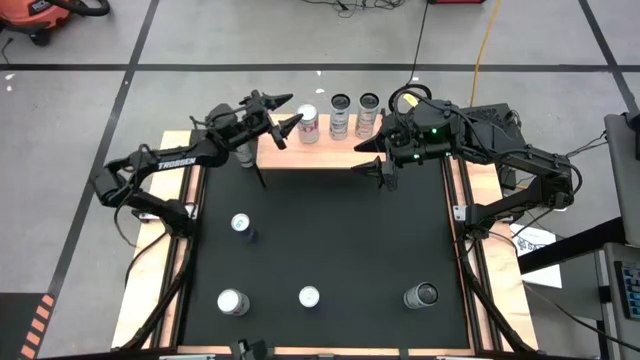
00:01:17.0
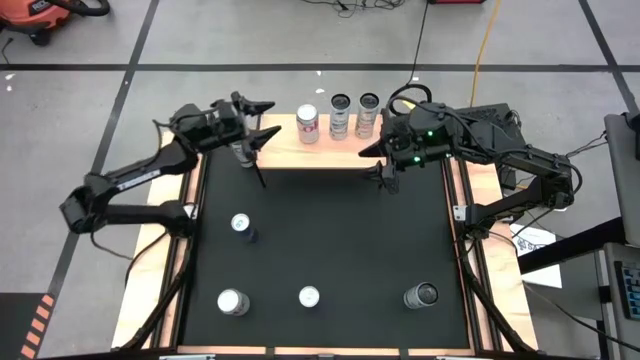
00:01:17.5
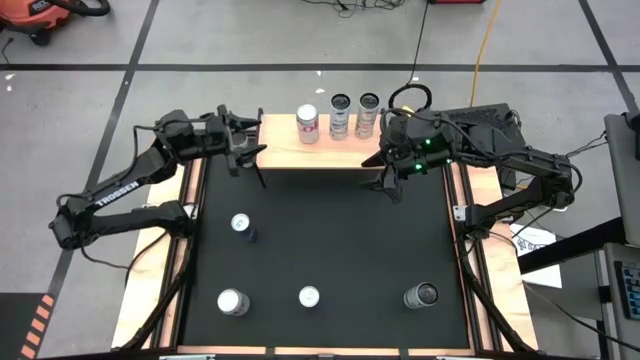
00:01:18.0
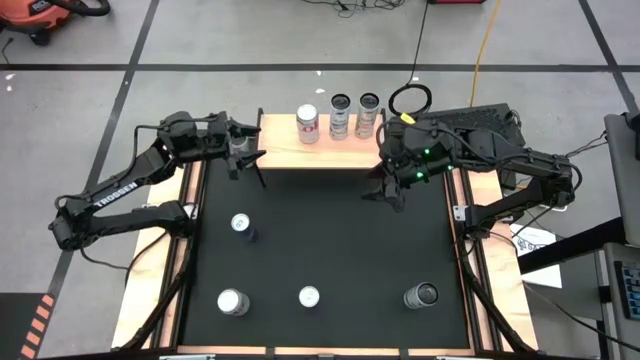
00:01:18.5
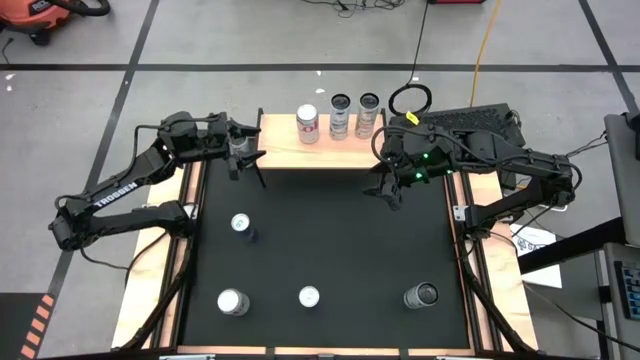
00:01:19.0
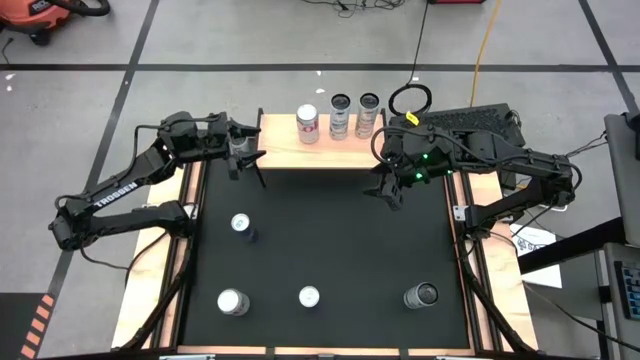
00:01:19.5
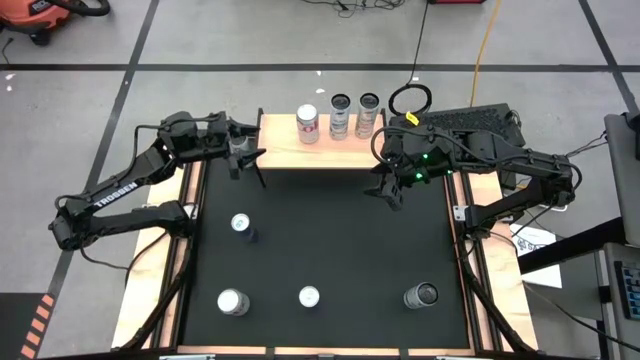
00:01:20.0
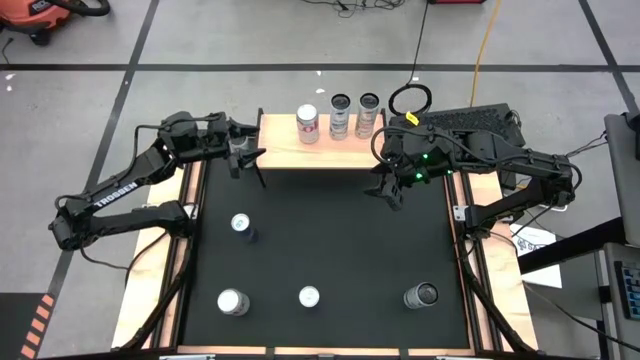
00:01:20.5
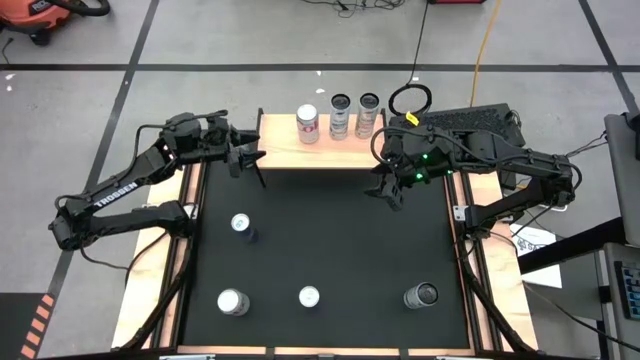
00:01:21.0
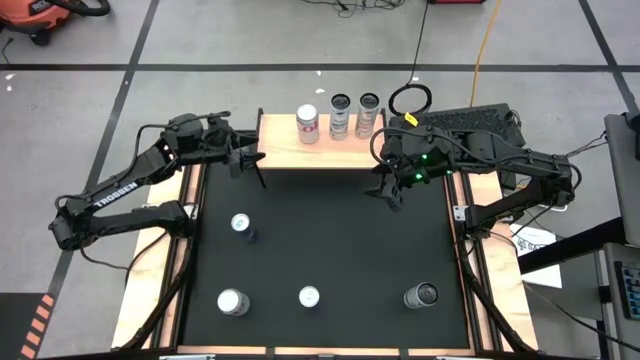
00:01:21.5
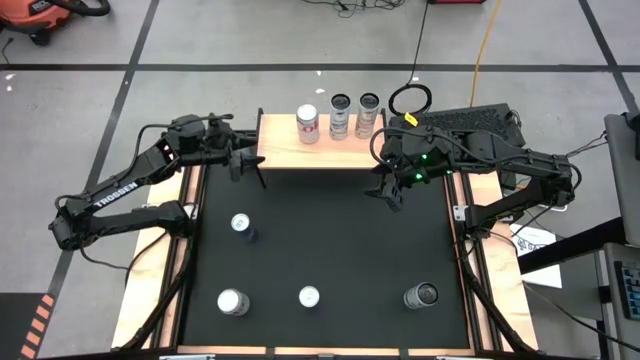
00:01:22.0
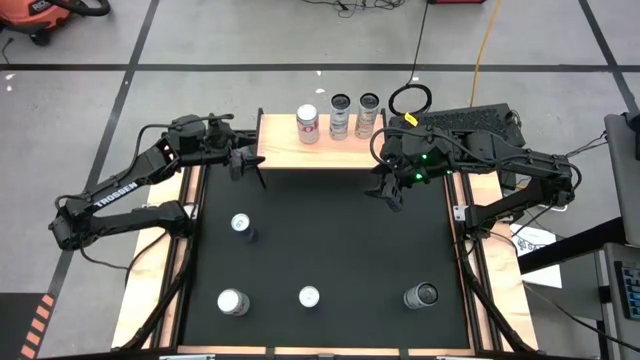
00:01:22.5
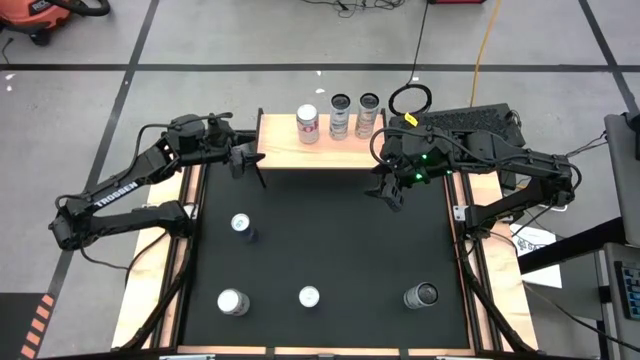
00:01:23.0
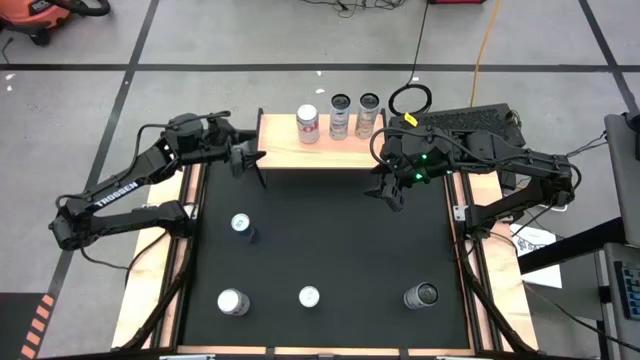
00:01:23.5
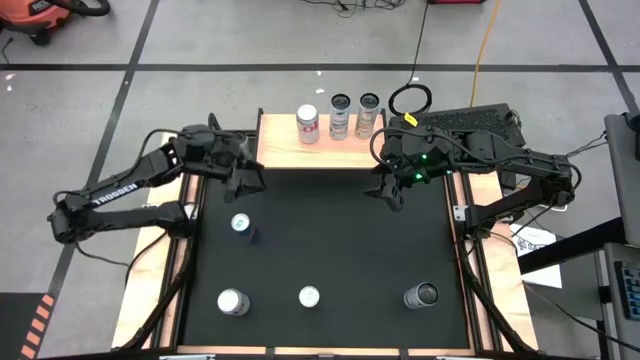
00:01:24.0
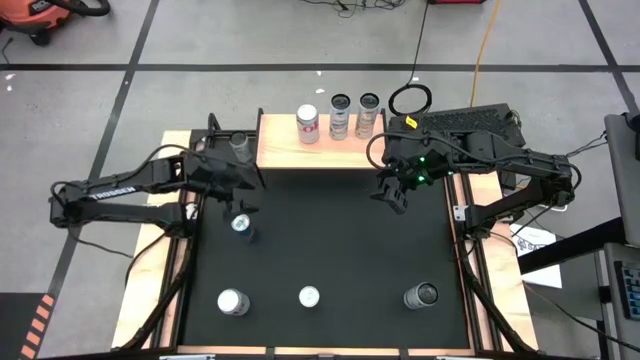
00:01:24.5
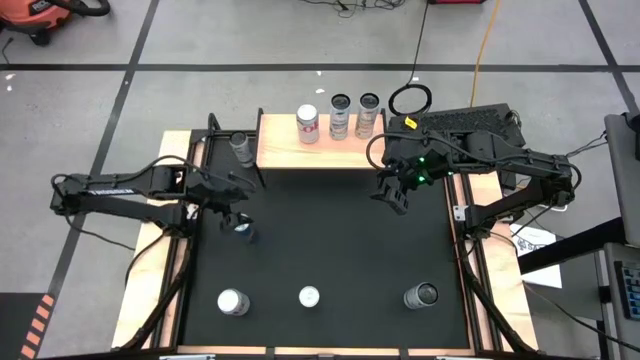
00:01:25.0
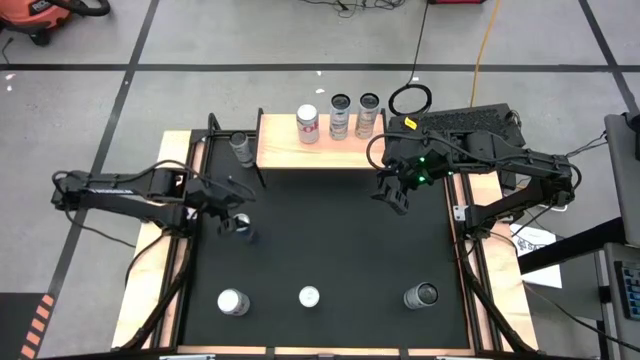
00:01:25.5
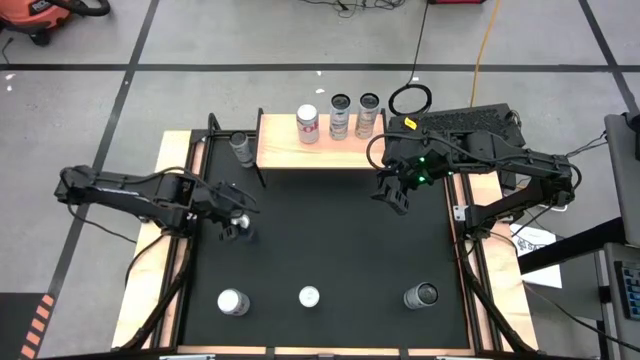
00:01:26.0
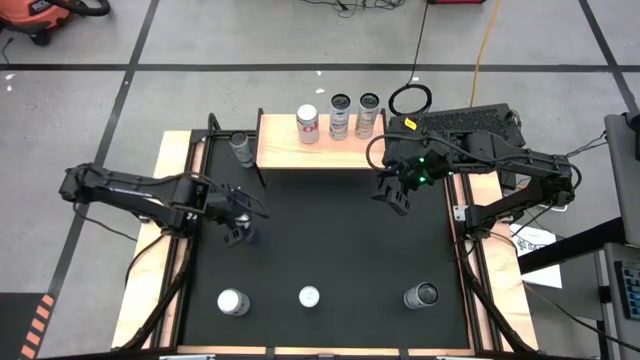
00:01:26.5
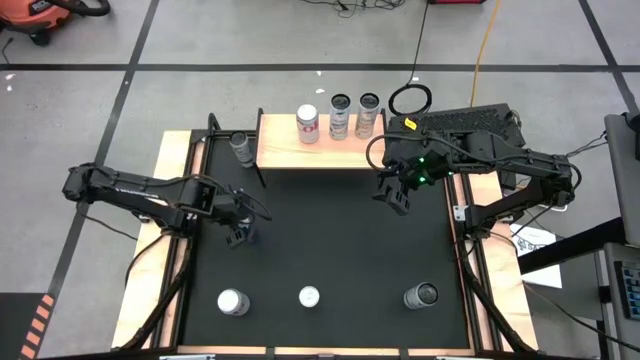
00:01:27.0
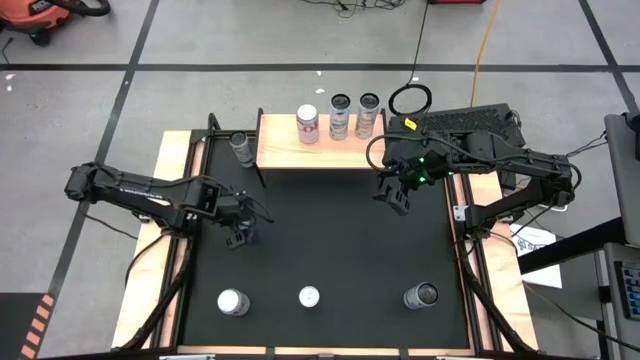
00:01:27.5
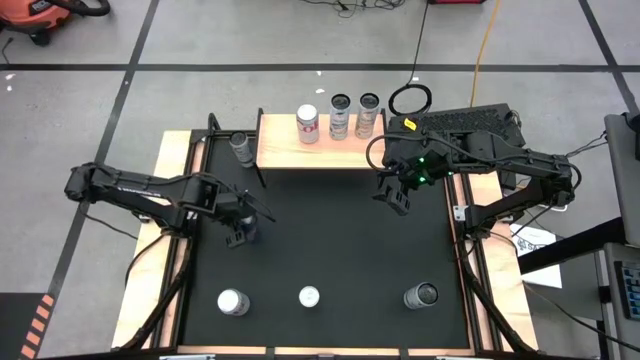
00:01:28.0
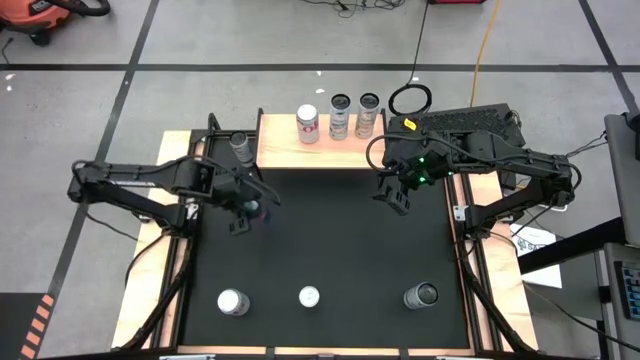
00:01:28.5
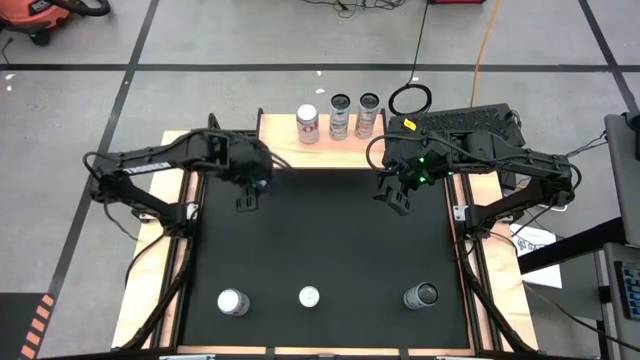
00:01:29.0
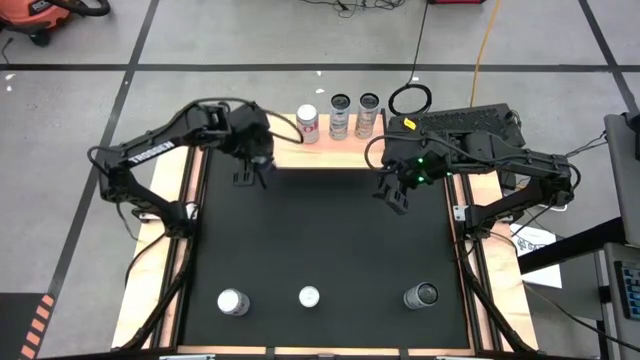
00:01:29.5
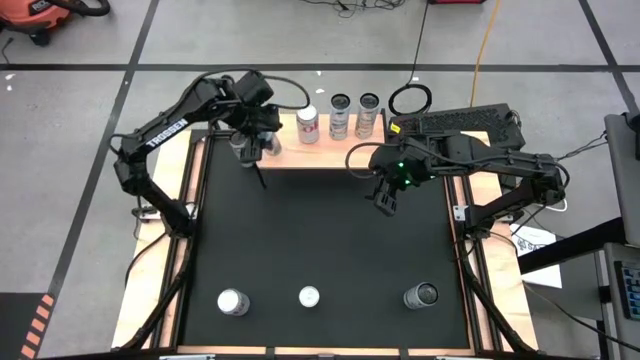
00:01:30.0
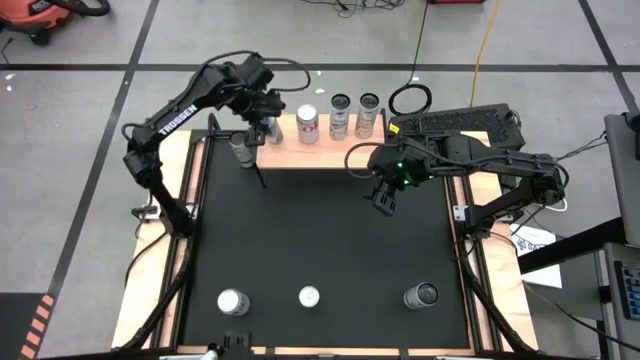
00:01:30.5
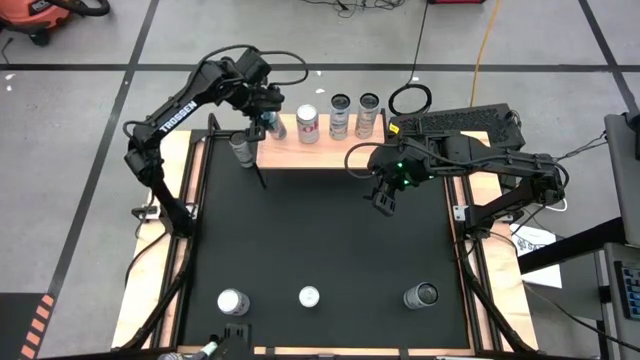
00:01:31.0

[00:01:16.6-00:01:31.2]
Task: Place canned beverage on shelf
Put the left blue soda can on the shelf

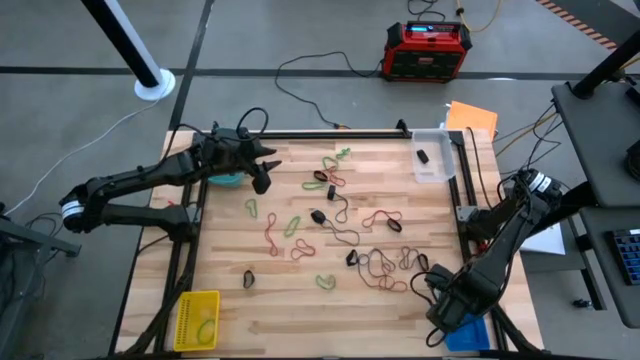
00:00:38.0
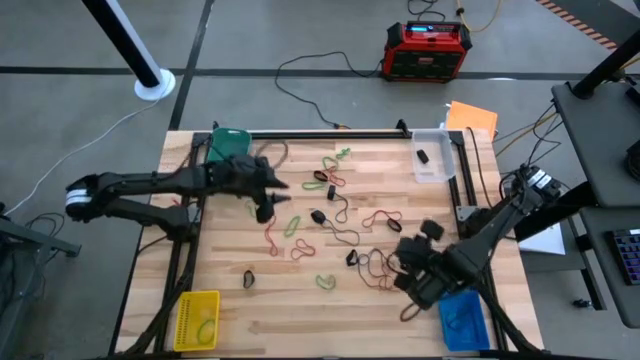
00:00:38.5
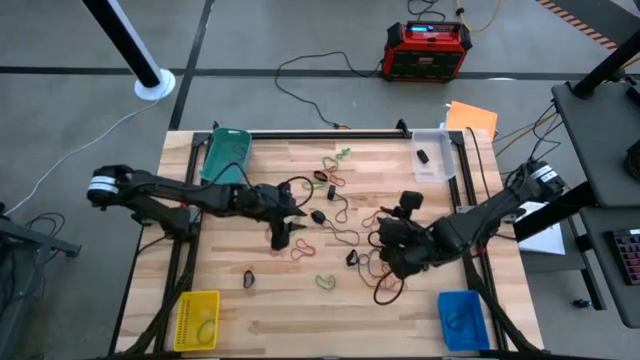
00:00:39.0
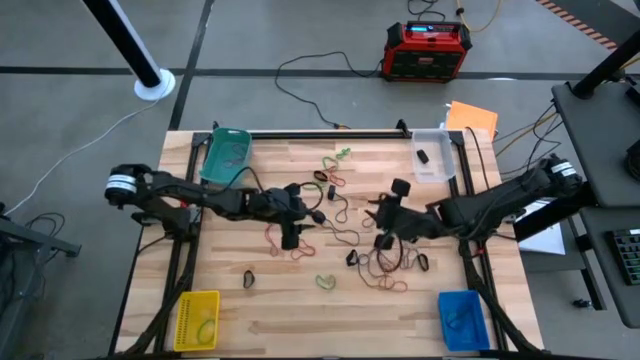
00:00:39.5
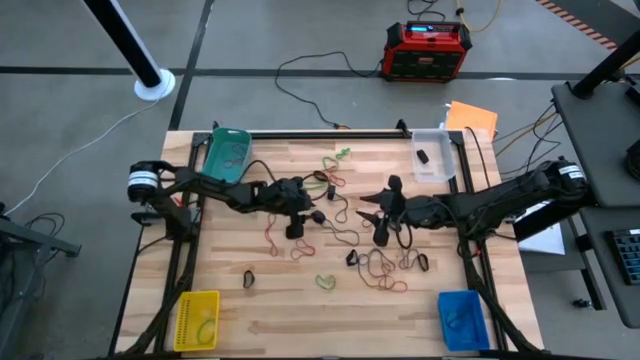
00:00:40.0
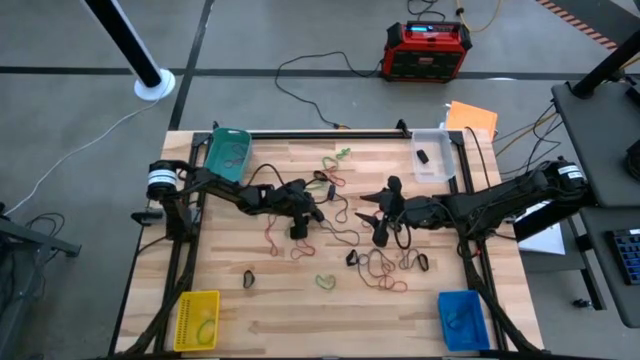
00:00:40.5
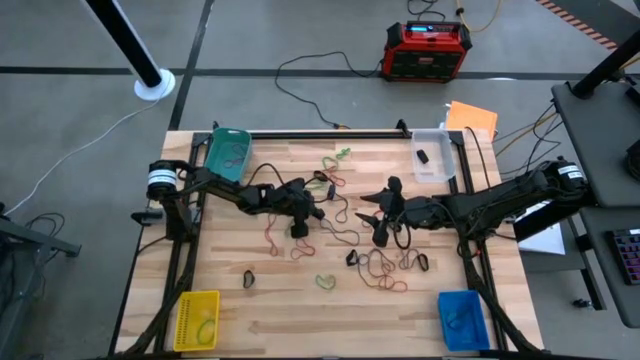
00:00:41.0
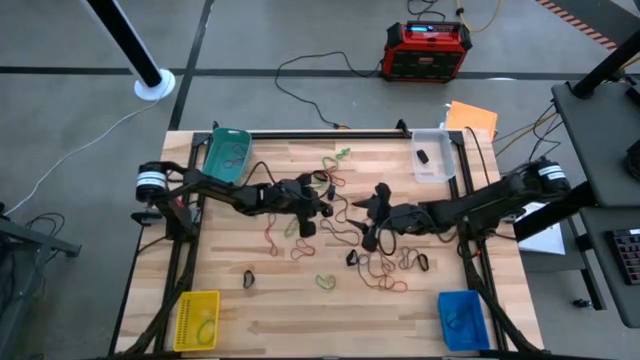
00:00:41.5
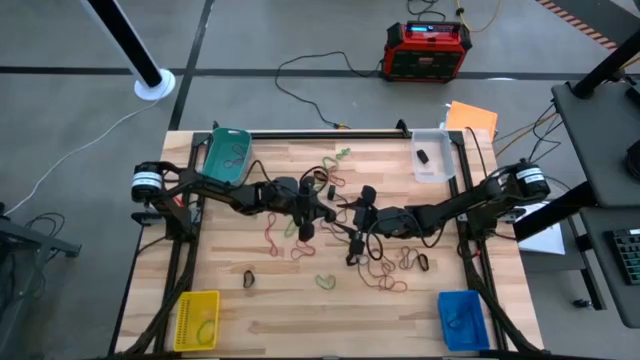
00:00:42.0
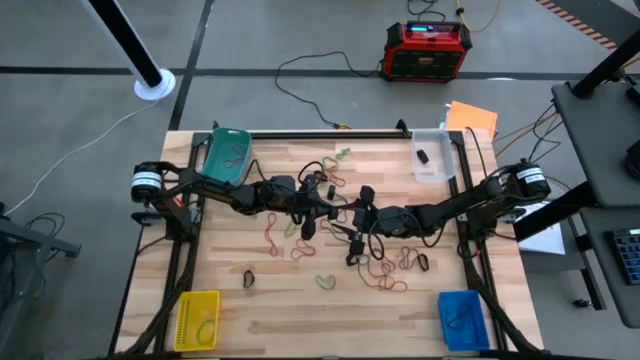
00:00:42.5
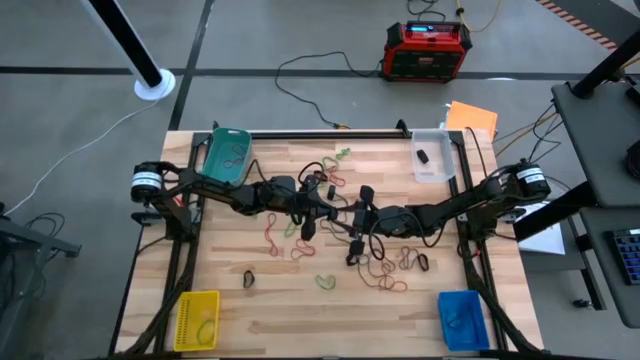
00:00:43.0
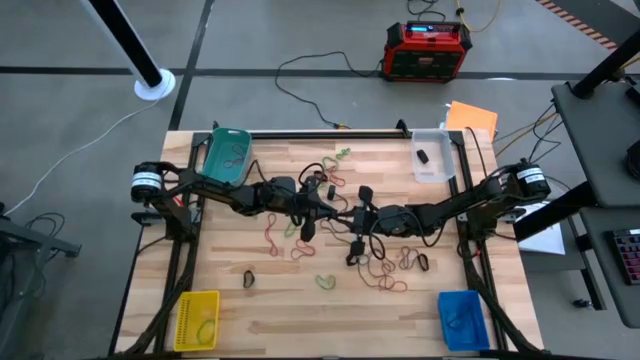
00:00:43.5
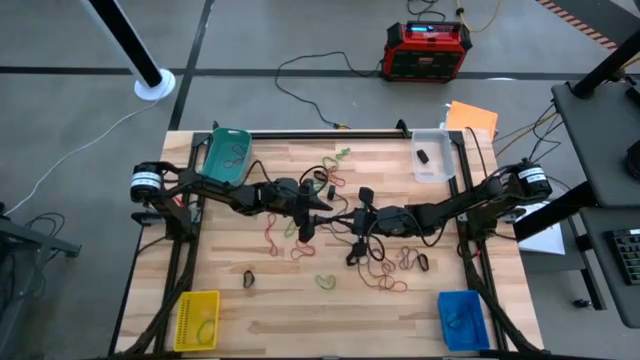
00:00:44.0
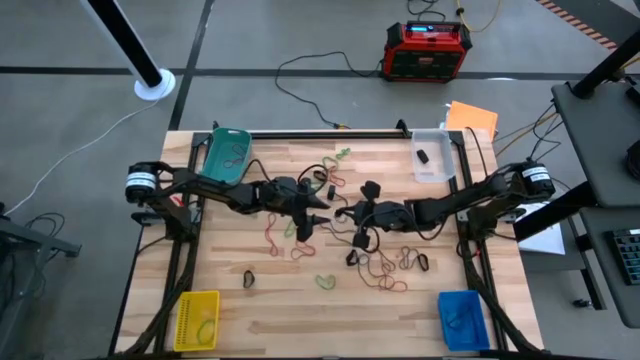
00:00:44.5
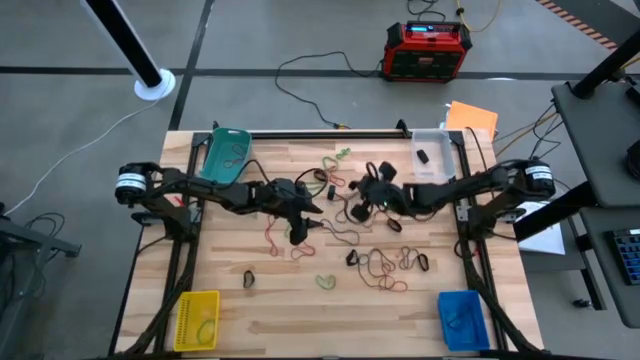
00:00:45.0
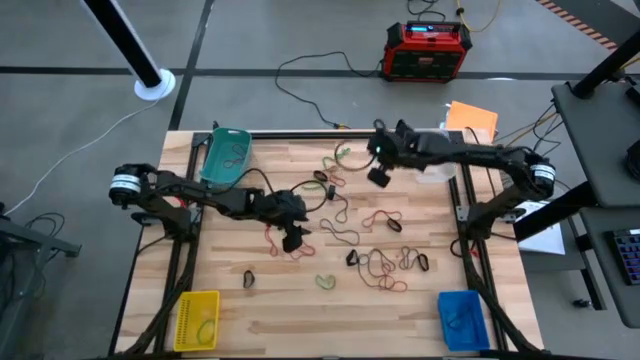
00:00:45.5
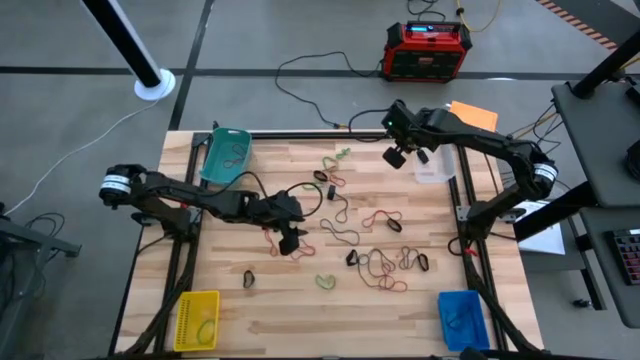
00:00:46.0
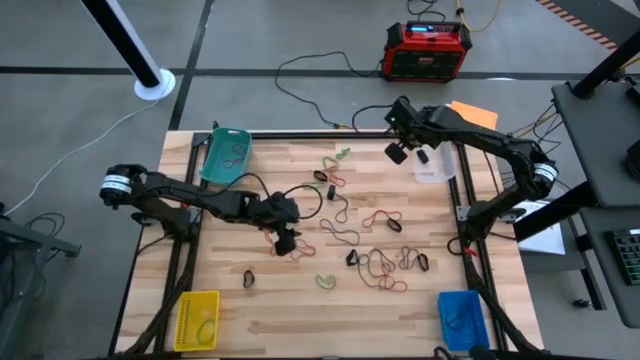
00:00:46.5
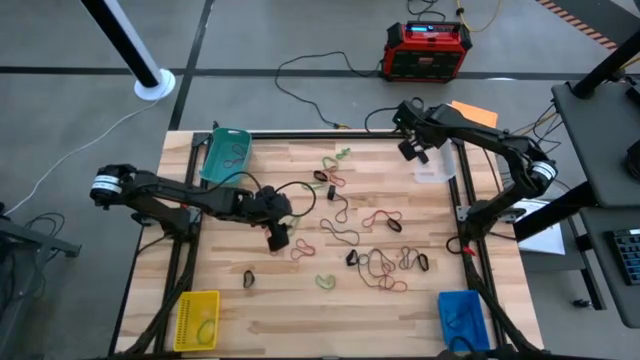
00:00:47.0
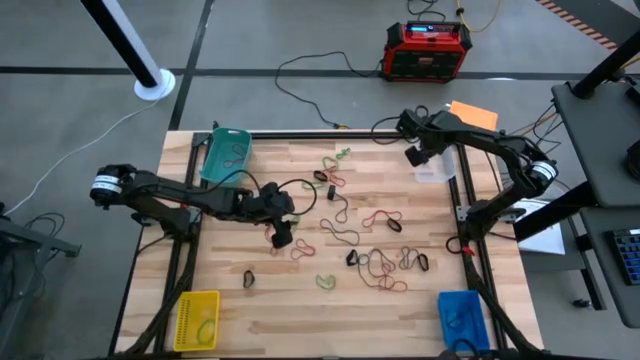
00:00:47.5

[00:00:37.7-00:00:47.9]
Task: Sort rubber bands into baskets
Put the black rubber band into the transparent bin
